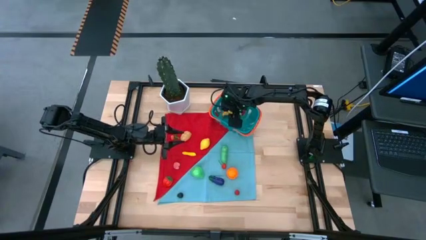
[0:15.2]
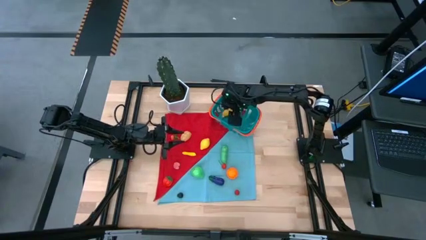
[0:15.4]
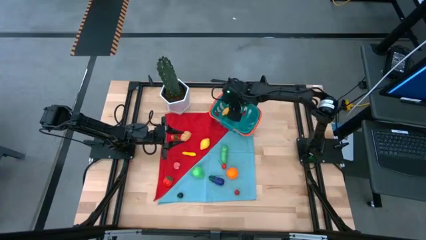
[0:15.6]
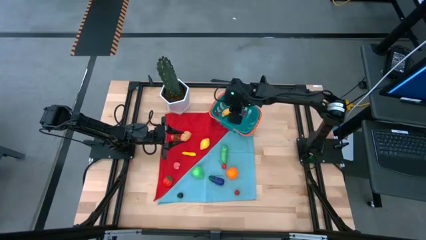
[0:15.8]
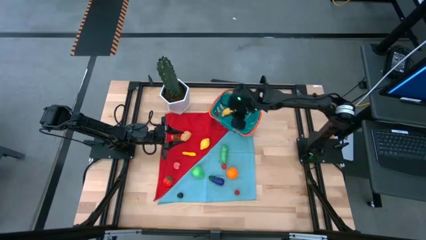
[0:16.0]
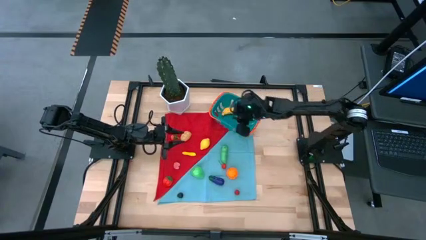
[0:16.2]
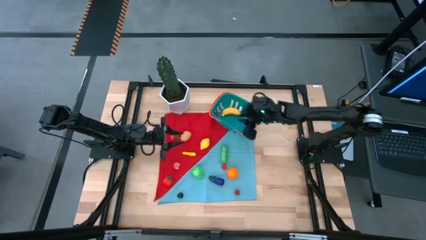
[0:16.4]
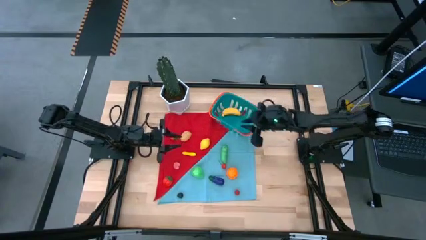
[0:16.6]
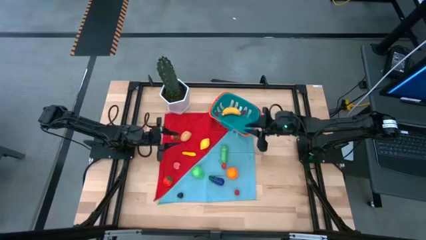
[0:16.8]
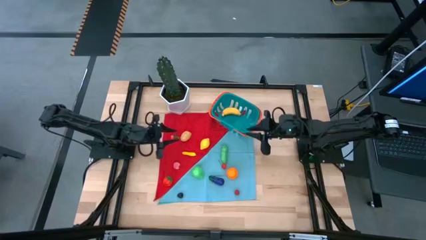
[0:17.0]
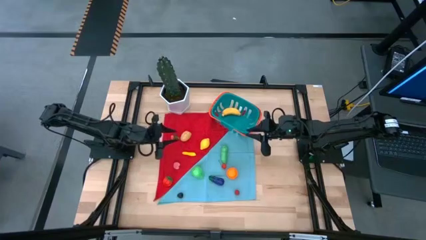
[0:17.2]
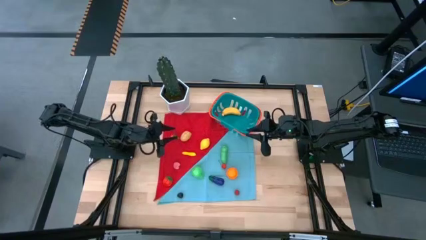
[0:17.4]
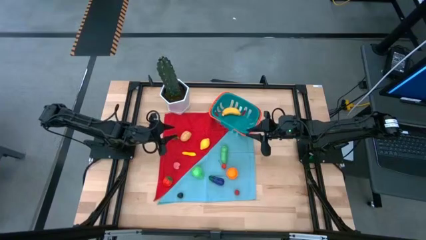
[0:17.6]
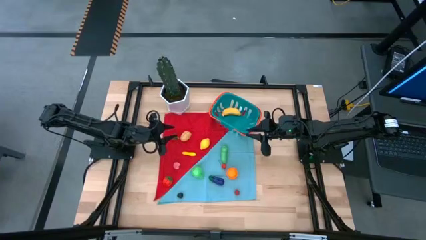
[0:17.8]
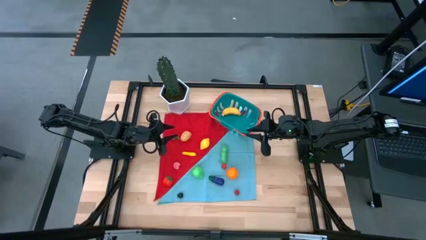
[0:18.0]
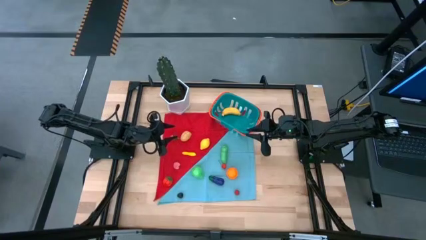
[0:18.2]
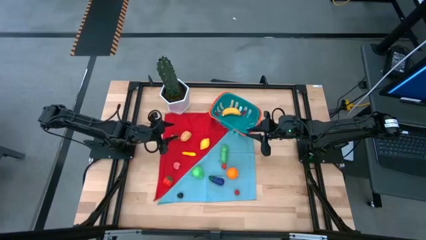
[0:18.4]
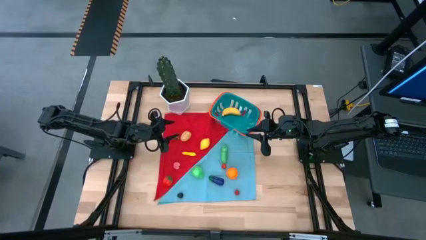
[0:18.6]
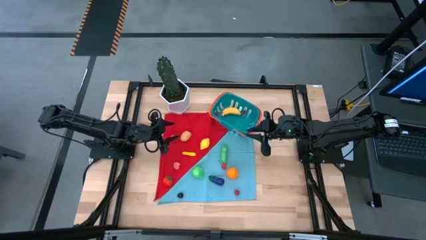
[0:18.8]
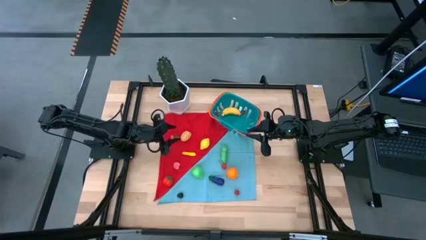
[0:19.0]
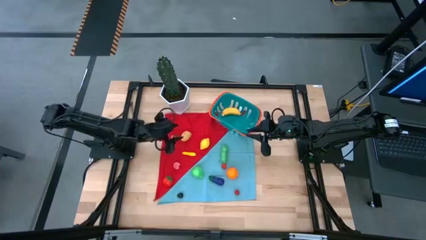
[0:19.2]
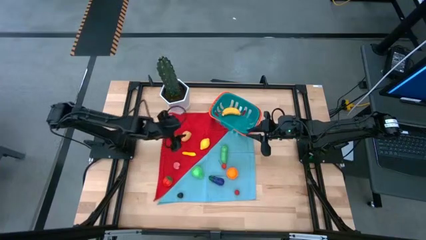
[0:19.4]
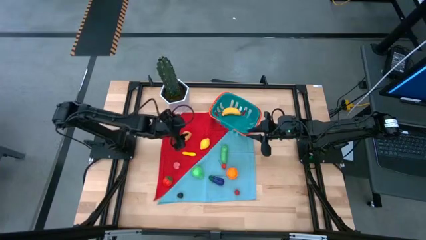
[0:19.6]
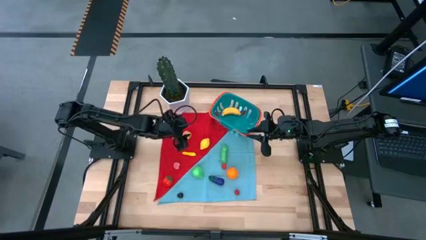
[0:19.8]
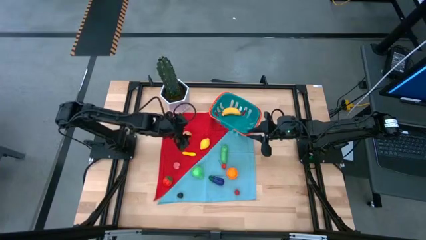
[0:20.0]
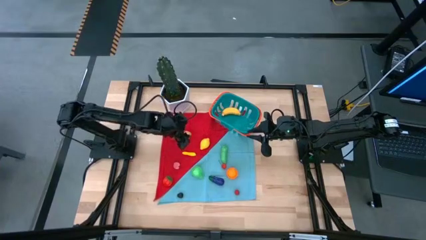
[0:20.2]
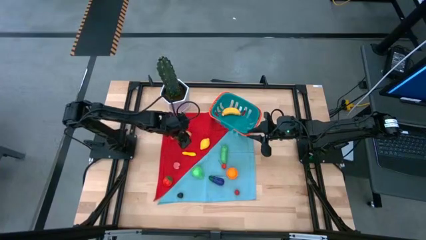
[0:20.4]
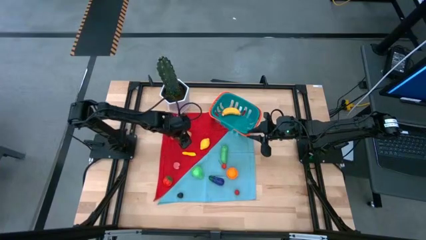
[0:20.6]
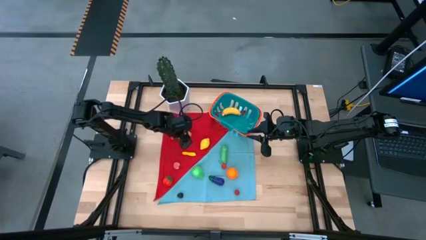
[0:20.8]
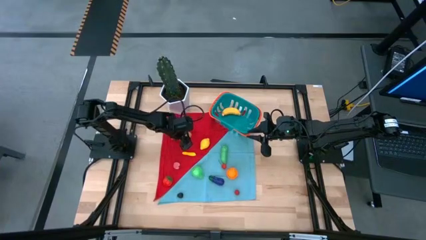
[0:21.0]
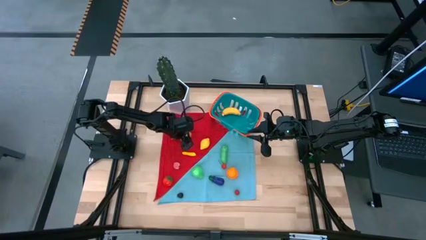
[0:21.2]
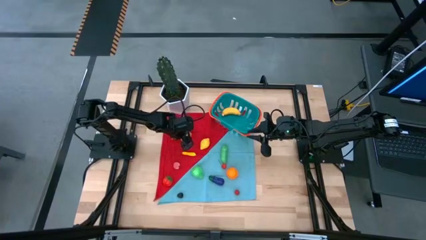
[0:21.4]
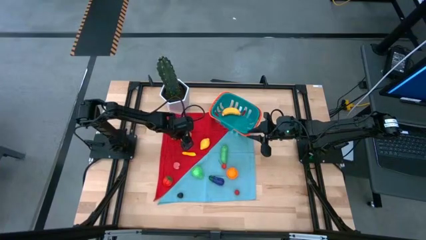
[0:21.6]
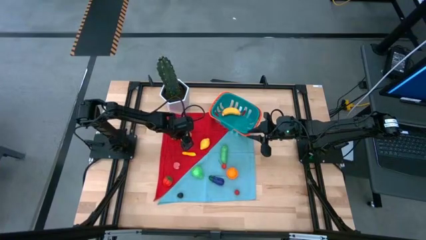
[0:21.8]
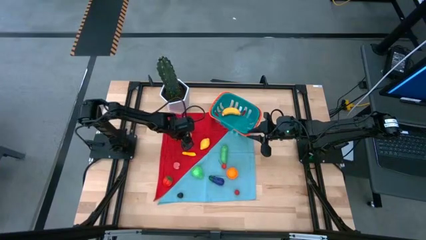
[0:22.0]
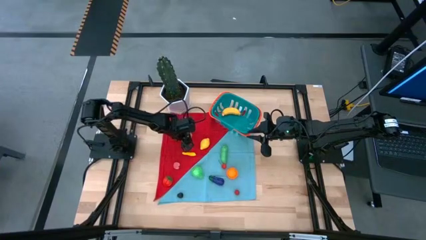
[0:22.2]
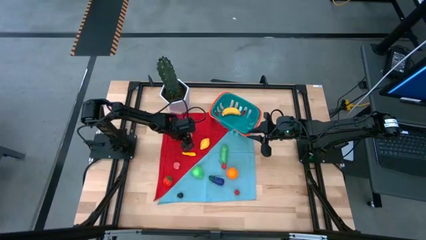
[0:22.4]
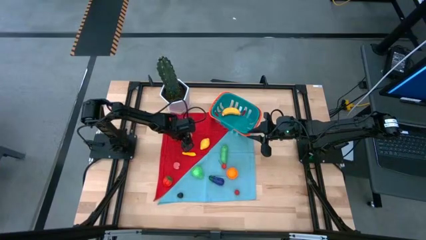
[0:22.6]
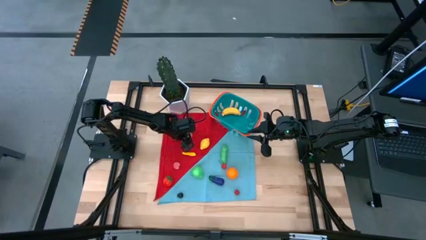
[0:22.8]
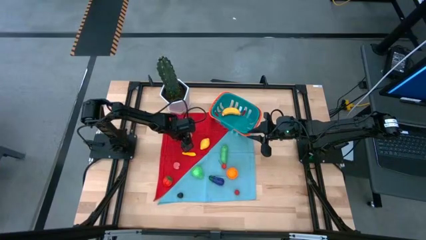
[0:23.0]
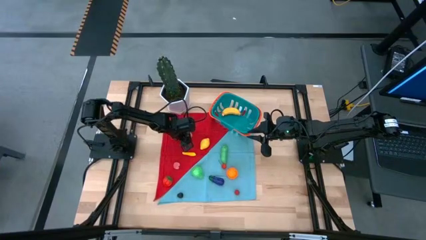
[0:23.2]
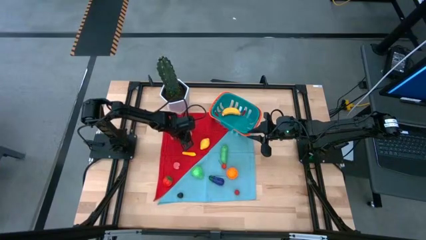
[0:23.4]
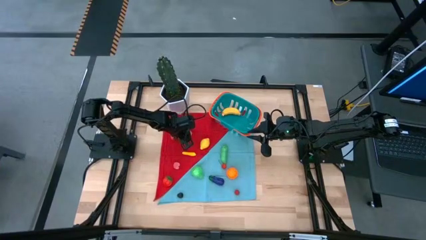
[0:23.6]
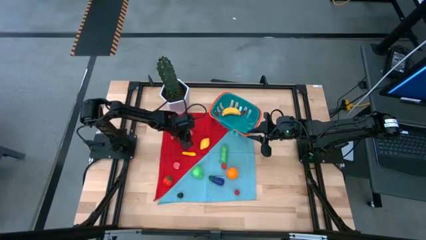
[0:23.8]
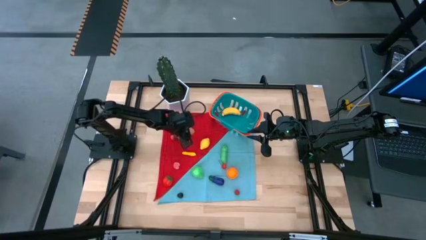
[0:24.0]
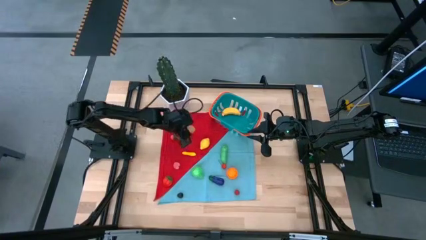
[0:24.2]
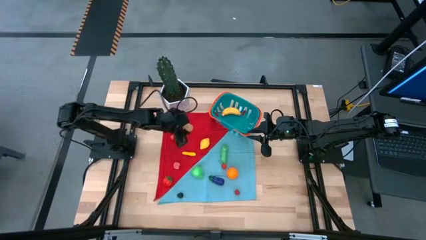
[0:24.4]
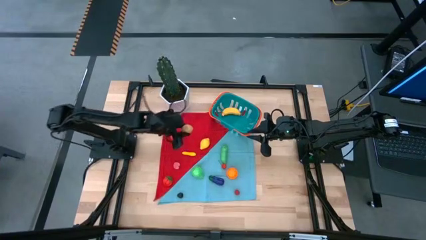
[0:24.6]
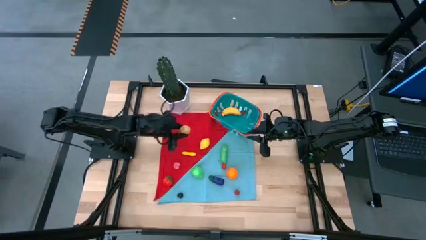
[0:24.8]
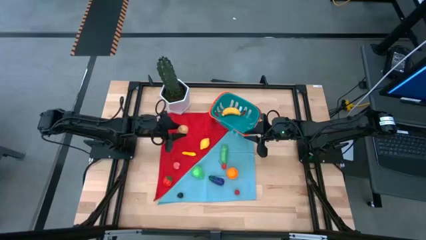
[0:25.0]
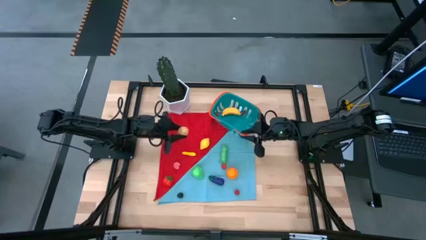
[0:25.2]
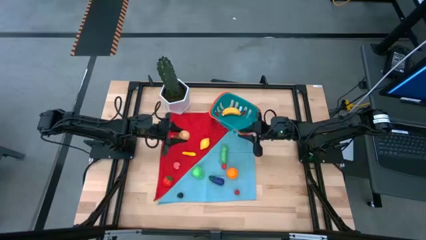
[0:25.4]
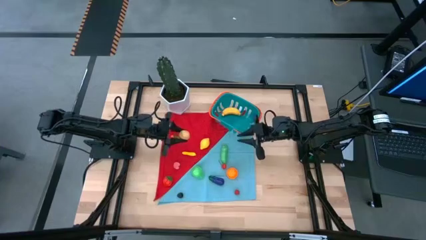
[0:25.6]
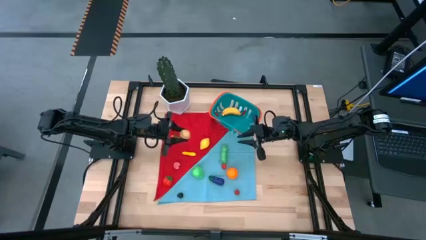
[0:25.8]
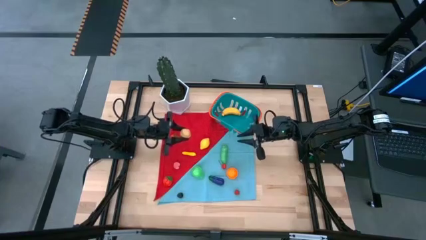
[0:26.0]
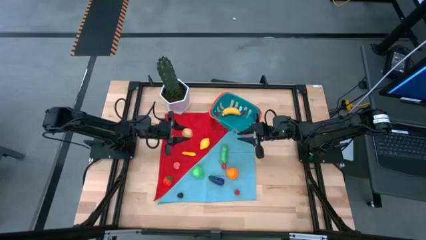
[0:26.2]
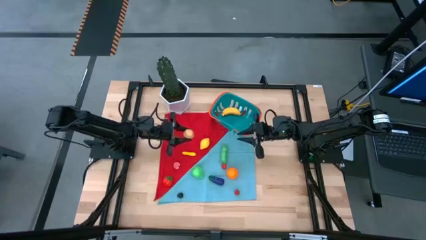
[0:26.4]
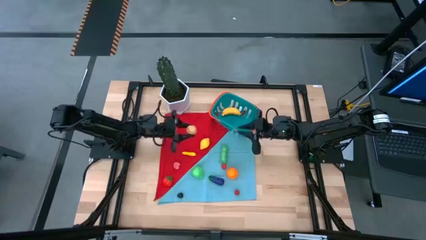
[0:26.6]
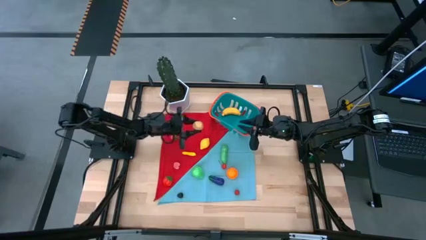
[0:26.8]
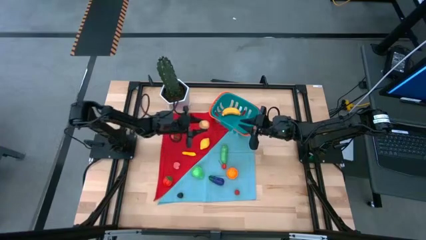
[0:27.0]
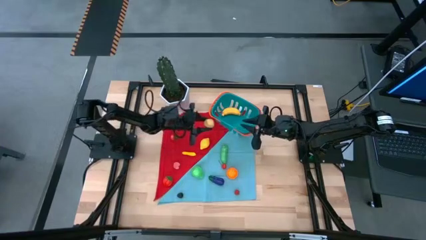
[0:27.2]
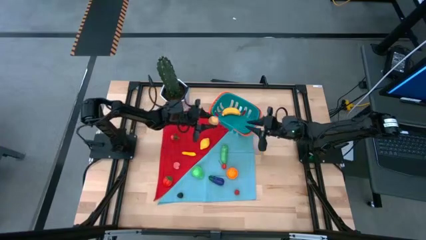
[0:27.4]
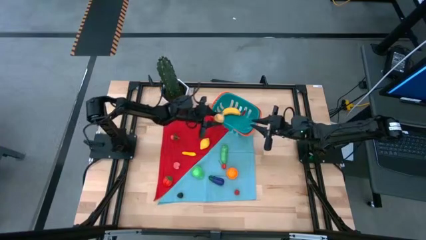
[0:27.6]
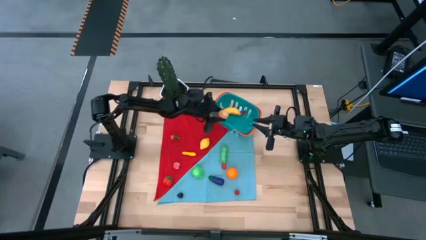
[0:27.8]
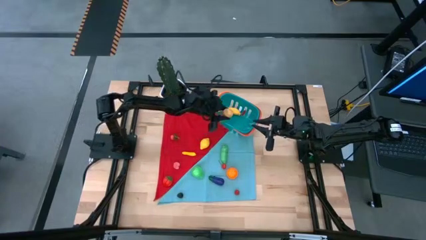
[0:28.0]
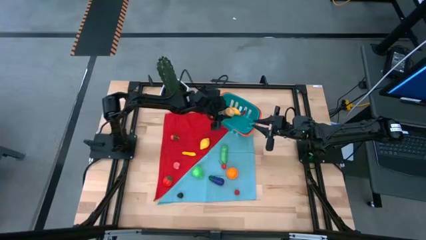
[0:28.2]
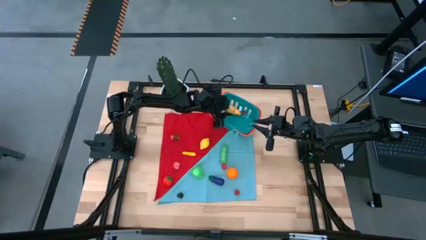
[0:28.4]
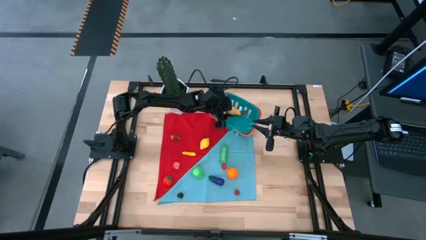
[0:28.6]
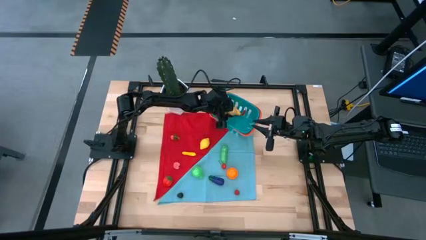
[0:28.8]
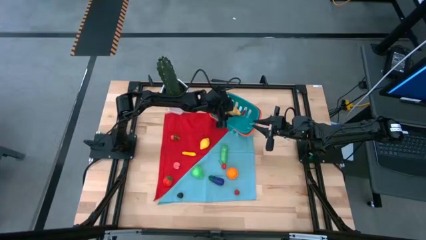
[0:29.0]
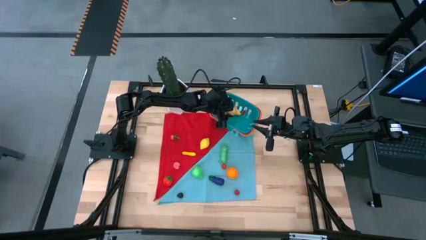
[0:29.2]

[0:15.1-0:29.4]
Task: Pick and placing Produce into tupperware
Put the brown potato into the blue basket
